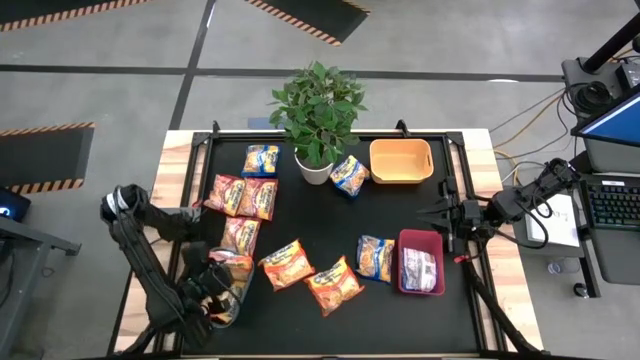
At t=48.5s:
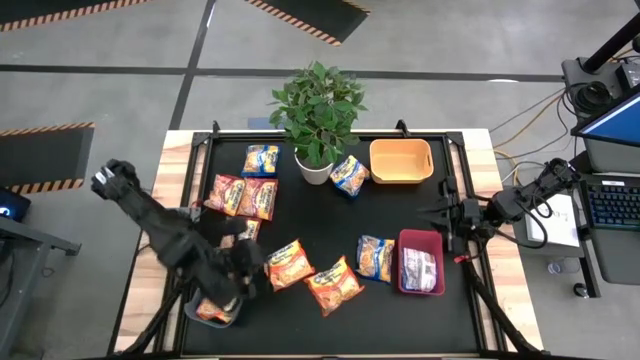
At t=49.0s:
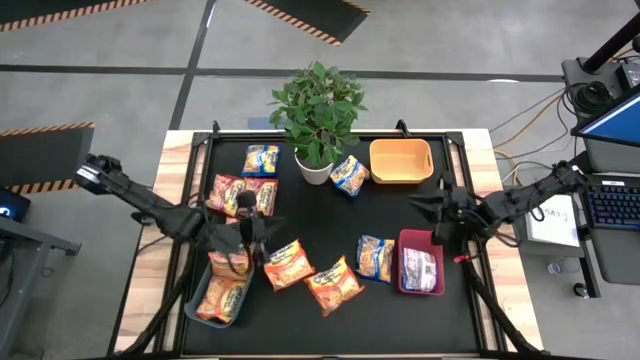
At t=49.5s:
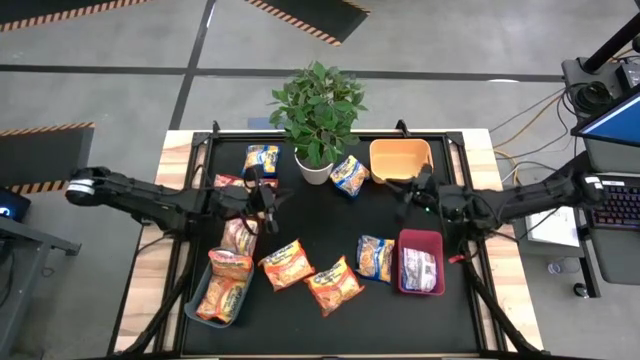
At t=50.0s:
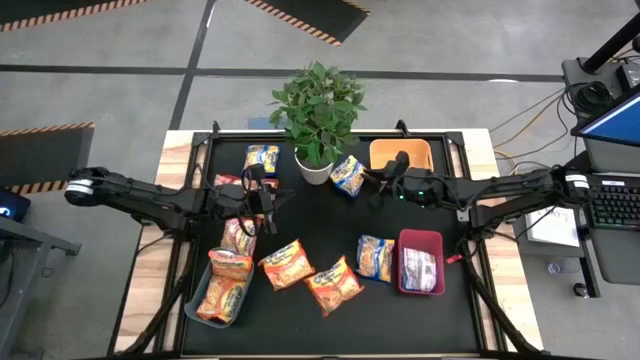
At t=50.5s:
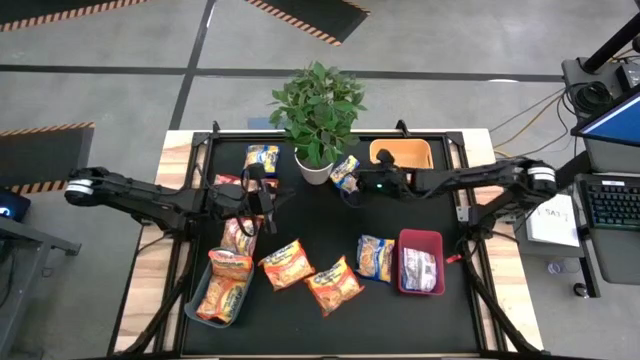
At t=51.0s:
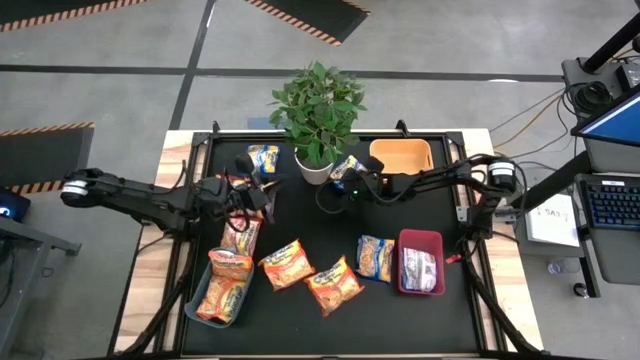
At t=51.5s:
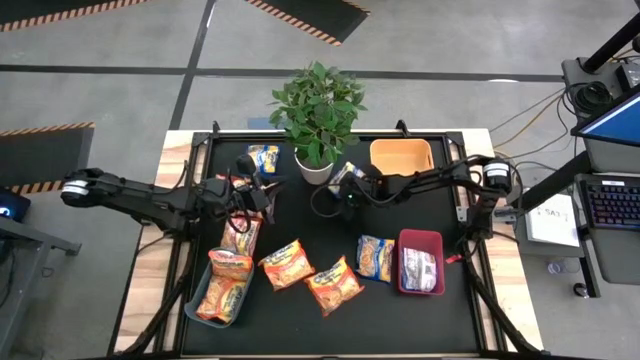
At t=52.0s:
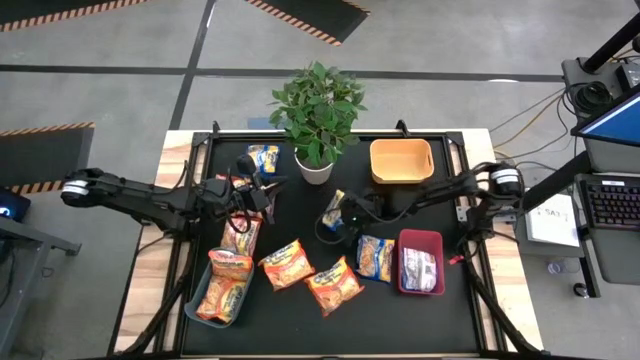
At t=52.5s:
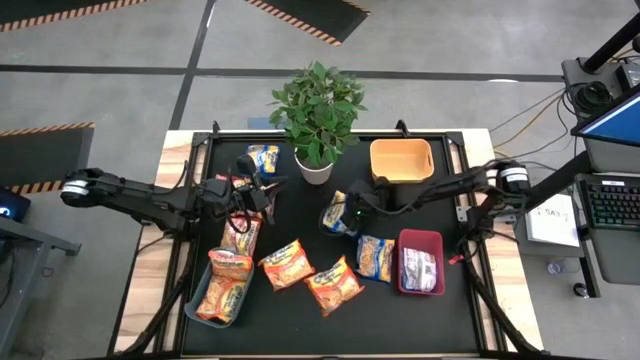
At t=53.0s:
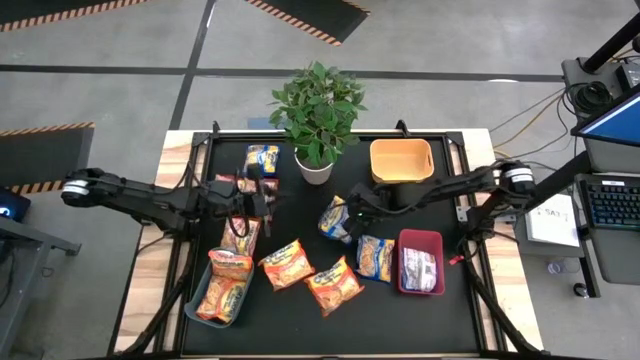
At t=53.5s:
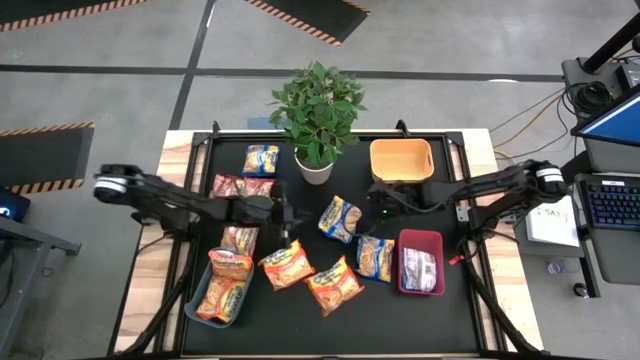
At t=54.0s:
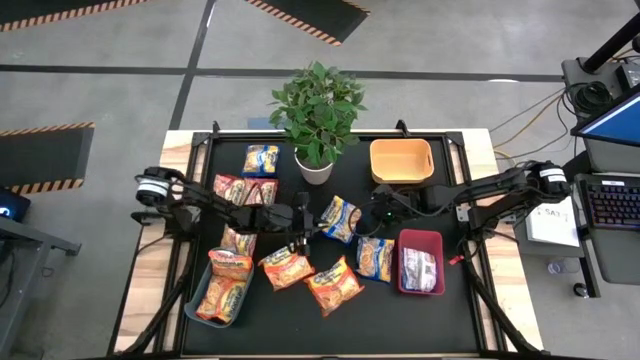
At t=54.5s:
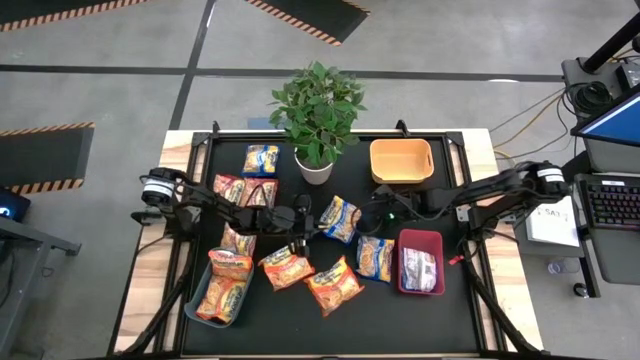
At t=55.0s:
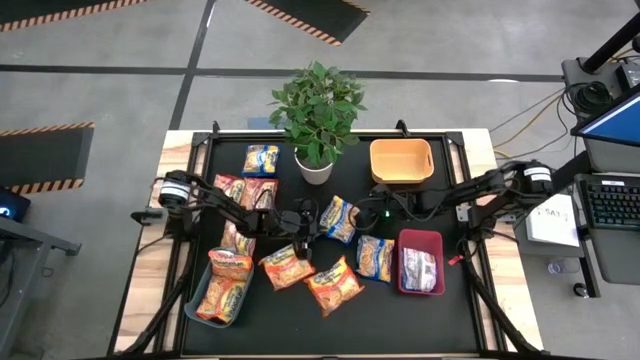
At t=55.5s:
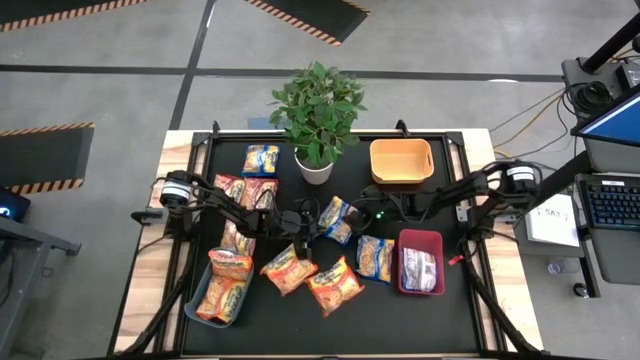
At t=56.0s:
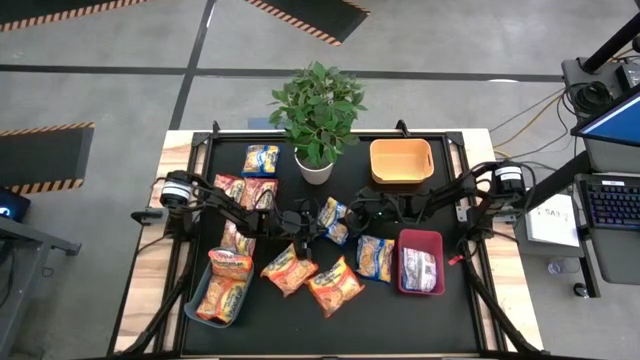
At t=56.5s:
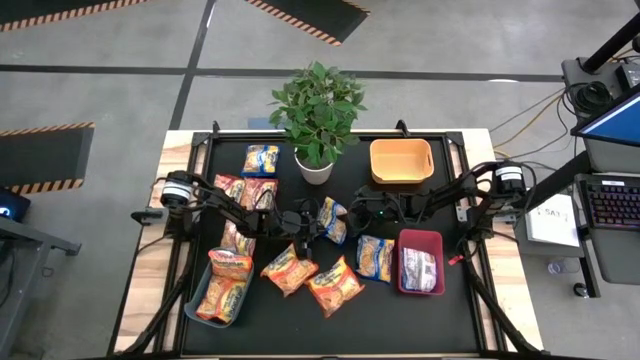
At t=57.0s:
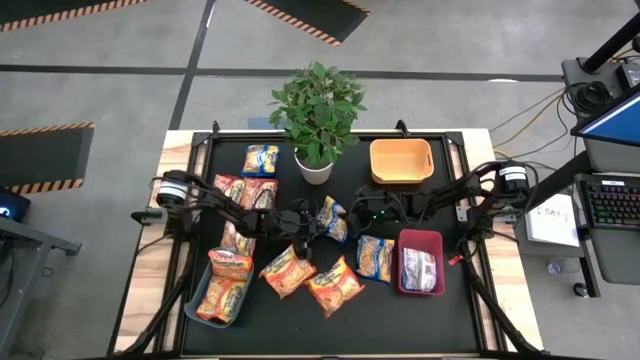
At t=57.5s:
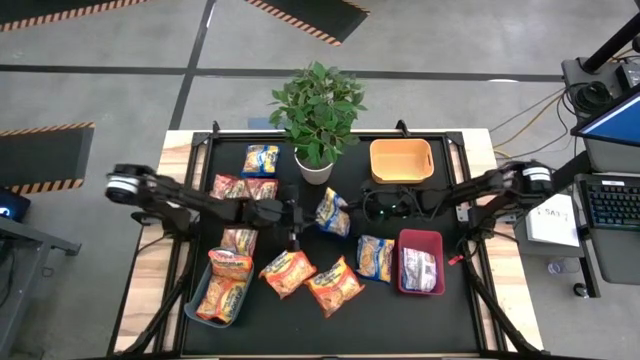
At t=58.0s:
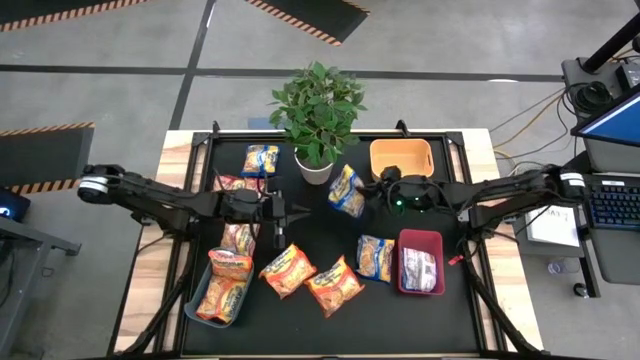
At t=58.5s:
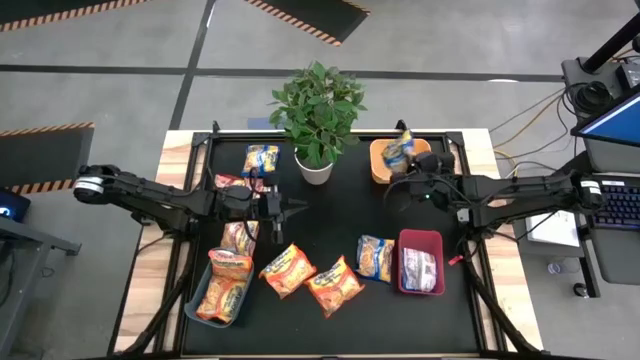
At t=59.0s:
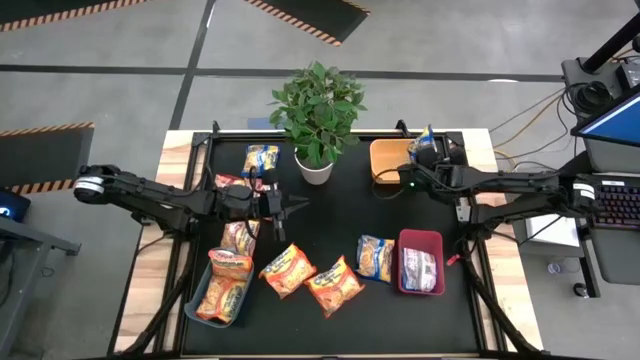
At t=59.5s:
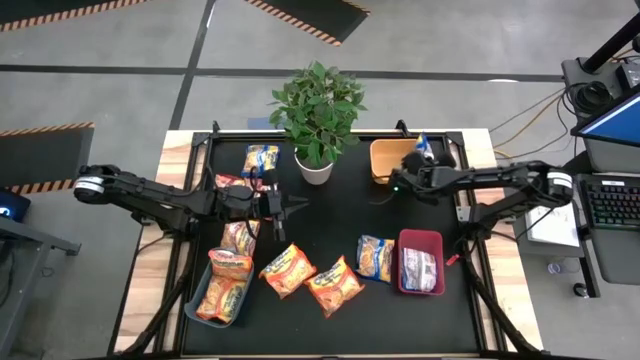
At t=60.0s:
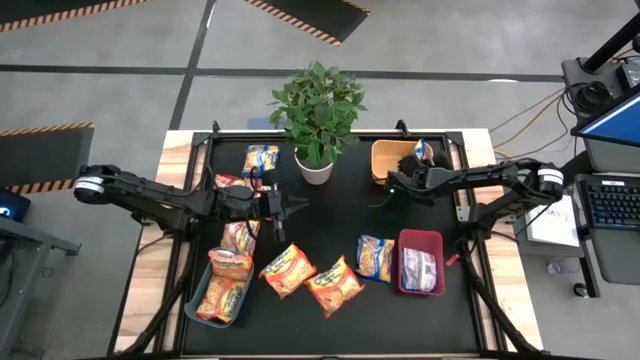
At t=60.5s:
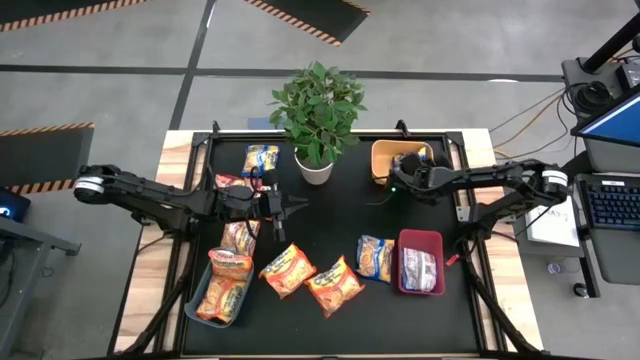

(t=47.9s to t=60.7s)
Task: Sort Maruchan noodles
Put the blue noodle pack into the yellow bin

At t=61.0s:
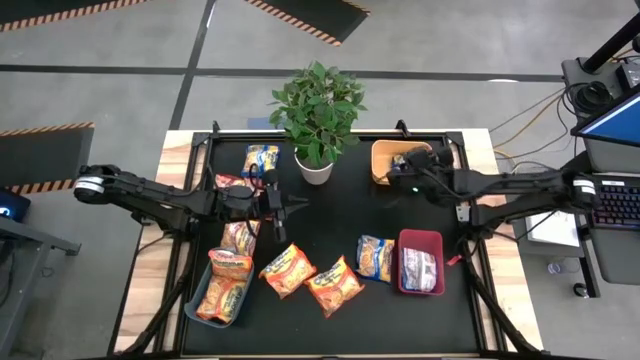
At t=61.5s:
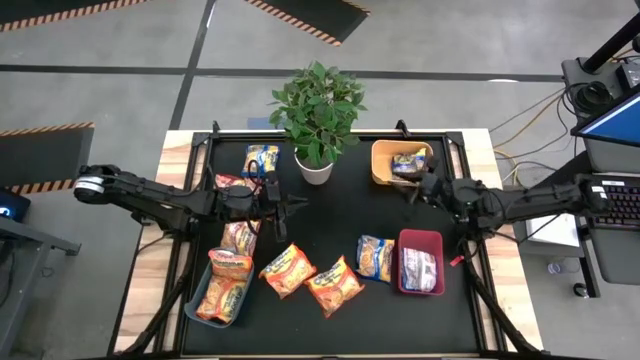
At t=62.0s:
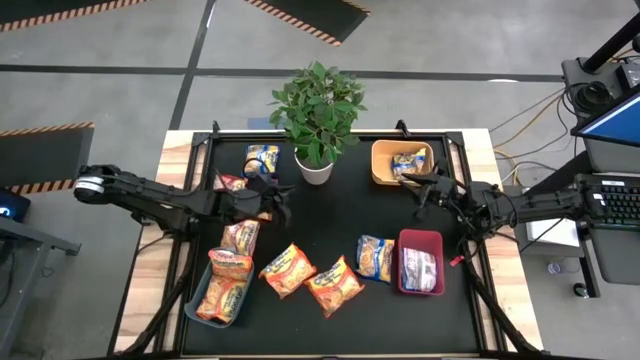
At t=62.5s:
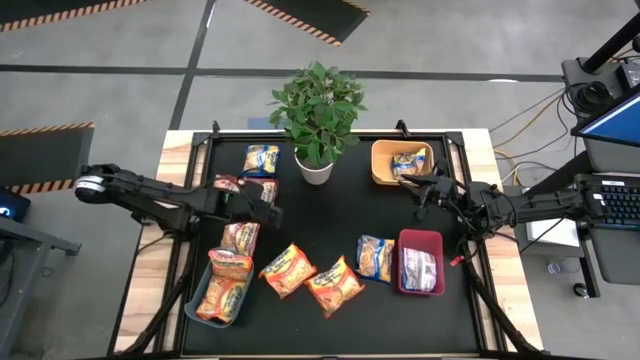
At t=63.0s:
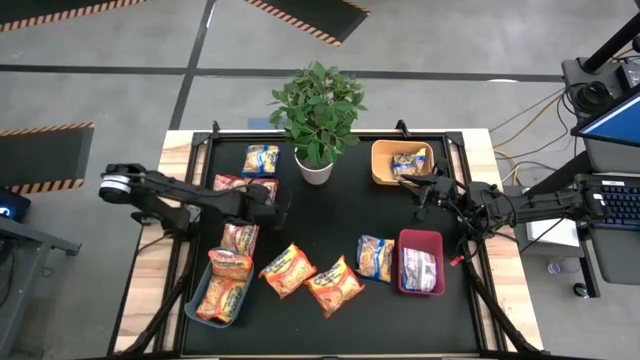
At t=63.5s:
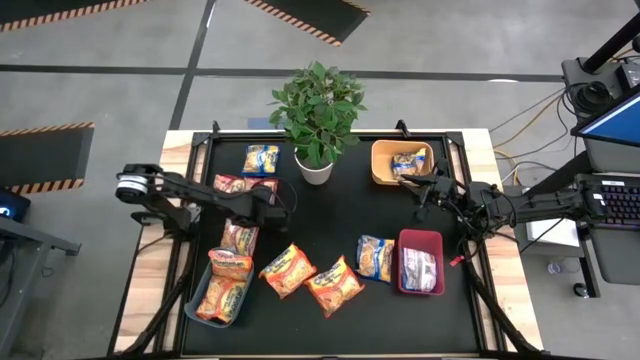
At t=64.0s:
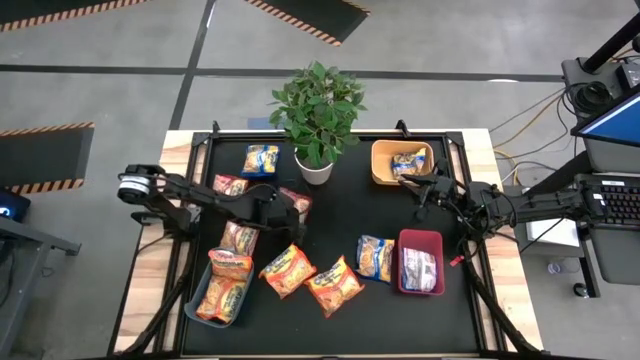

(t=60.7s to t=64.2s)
Move the red noodle pack to the center

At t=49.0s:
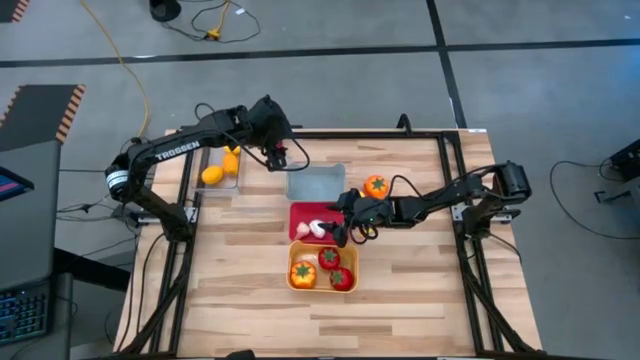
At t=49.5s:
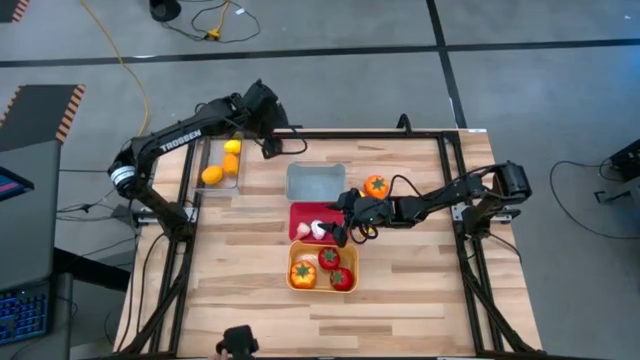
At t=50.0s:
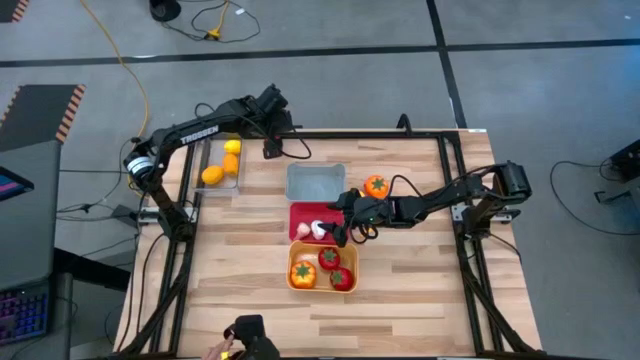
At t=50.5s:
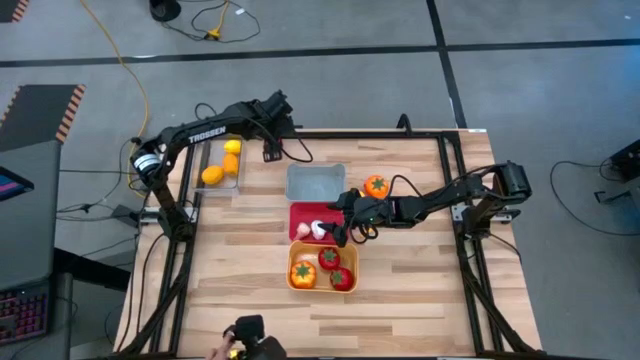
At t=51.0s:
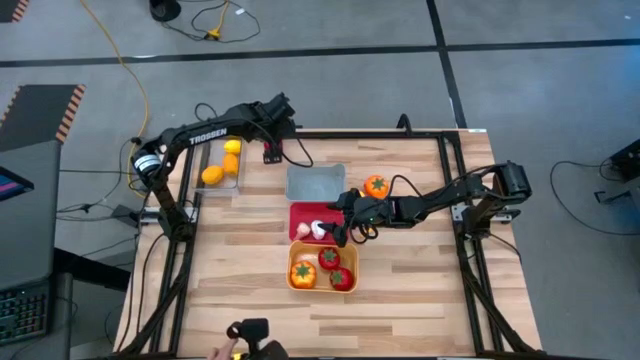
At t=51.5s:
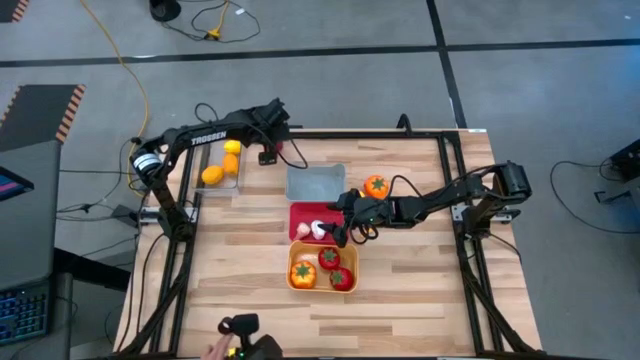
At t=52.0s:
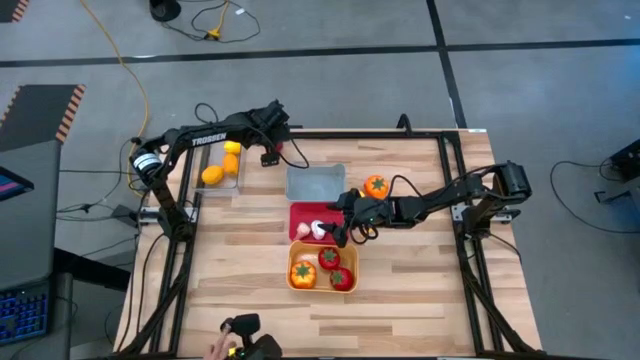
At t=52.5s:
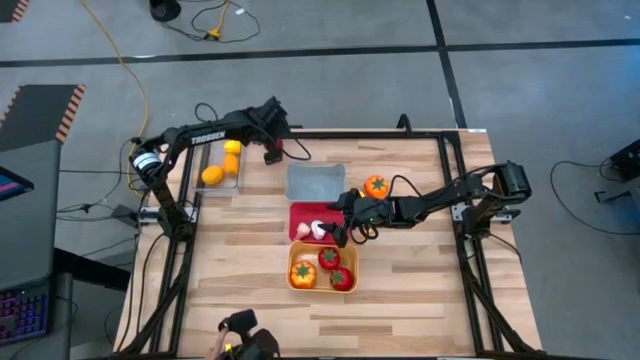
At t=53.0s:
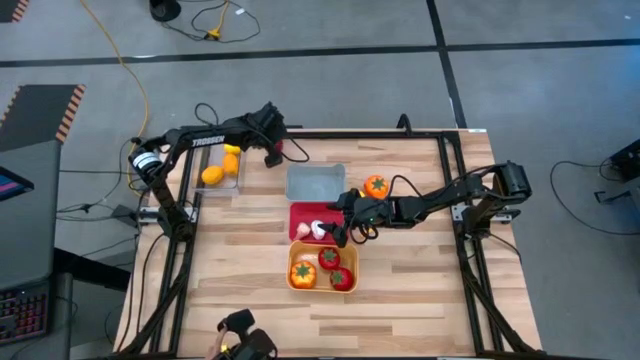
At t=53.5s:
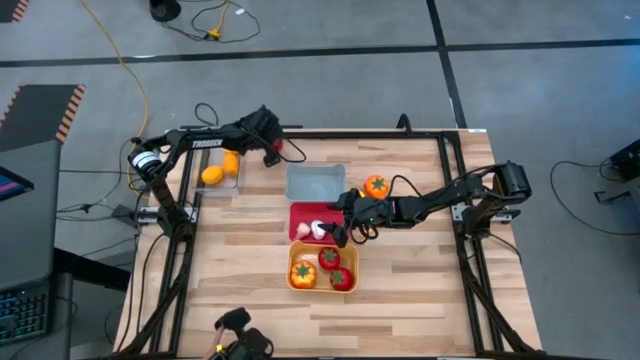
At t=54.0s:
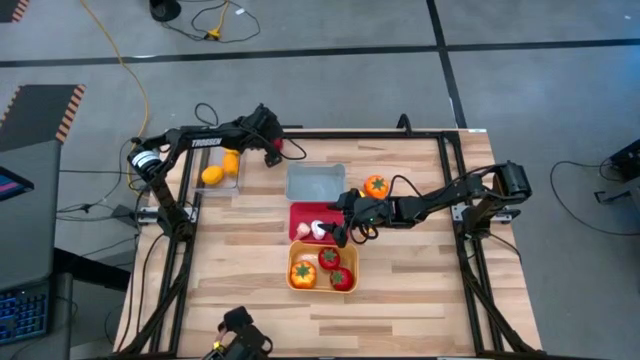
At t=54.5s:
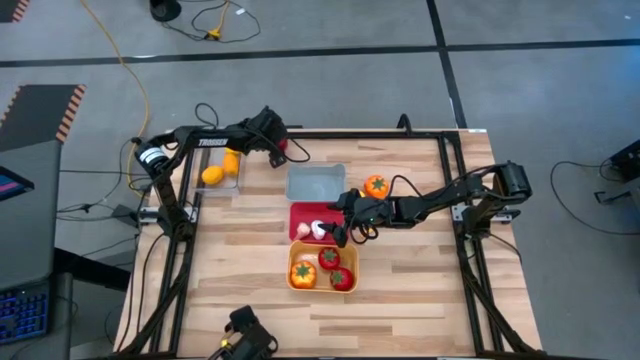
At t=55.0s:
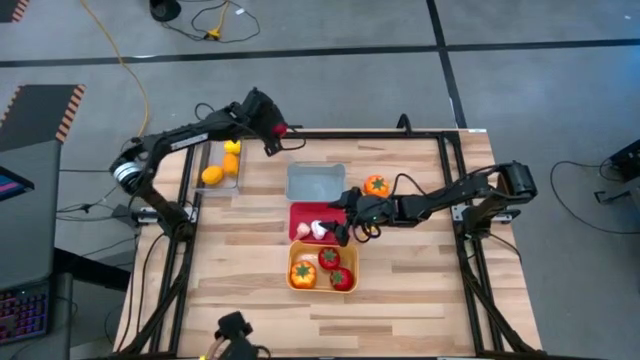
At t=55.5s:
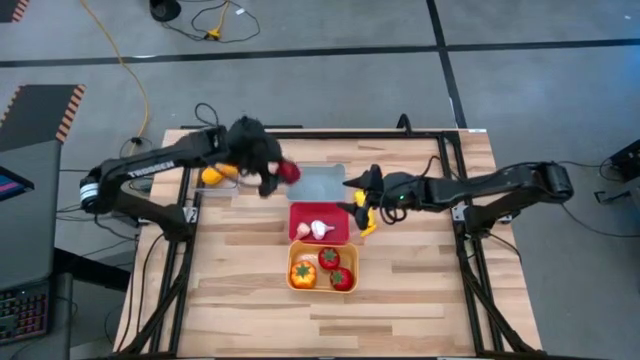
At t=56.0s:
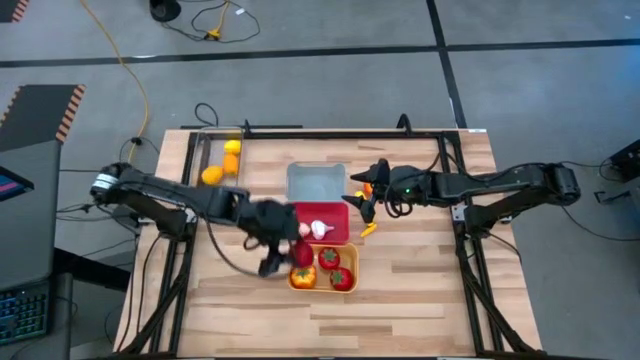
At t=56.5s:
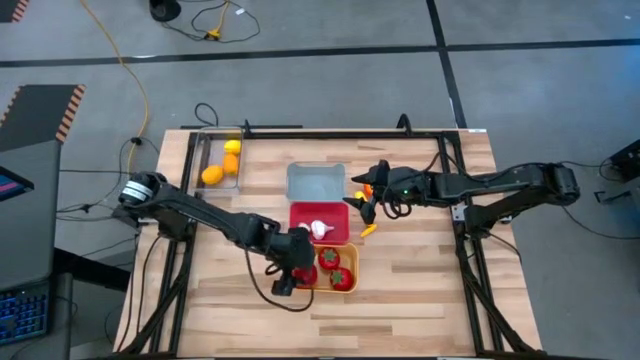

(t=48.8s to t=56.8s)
Task: Sort produce into baskets
Put the red tomato into the yellow bin
